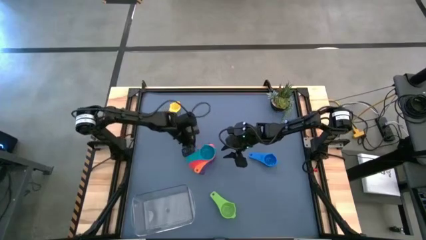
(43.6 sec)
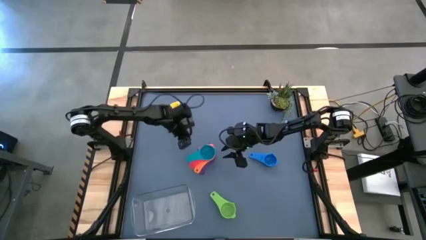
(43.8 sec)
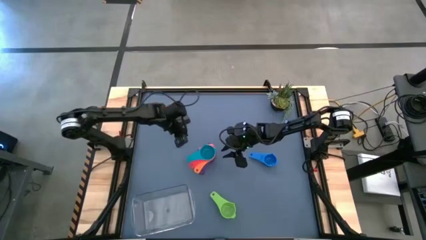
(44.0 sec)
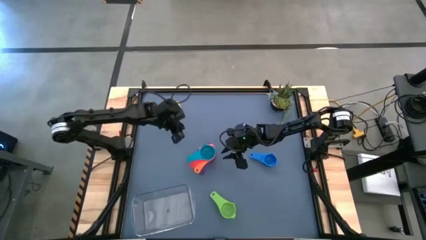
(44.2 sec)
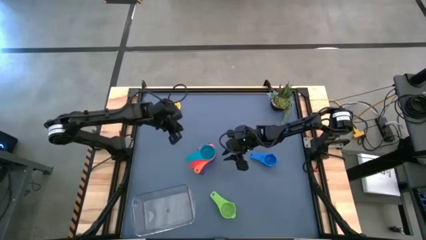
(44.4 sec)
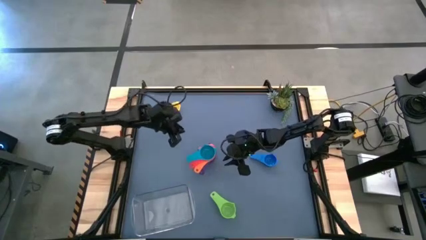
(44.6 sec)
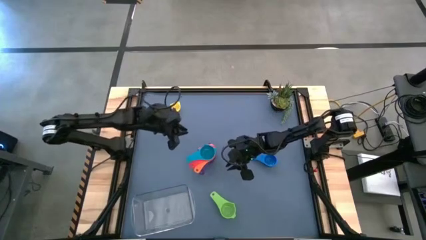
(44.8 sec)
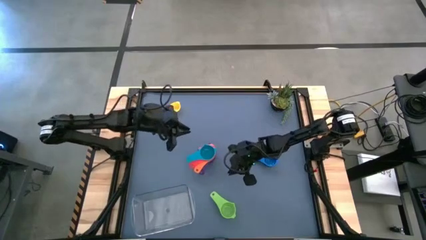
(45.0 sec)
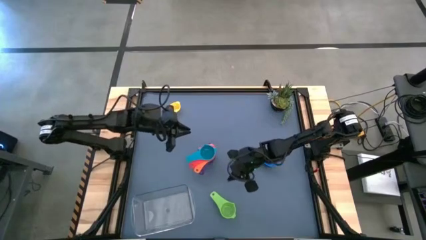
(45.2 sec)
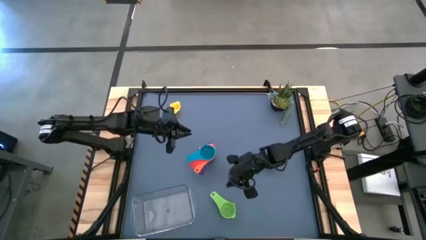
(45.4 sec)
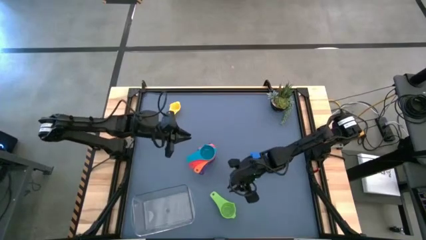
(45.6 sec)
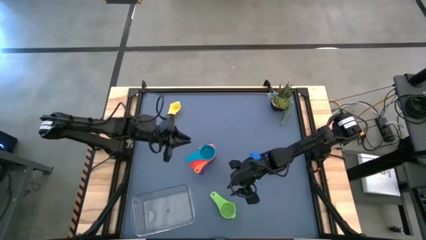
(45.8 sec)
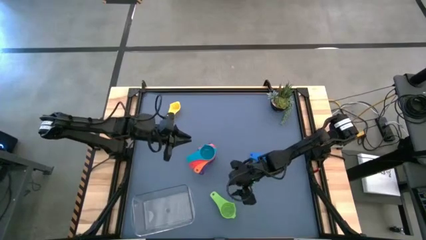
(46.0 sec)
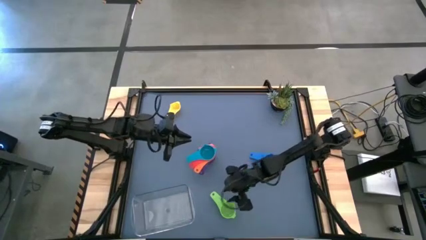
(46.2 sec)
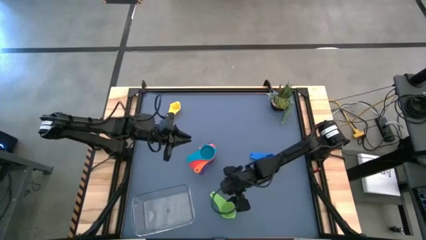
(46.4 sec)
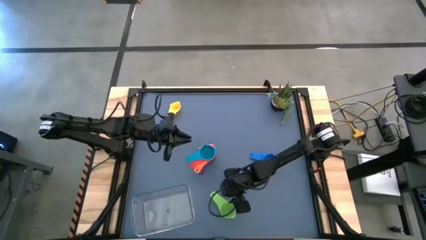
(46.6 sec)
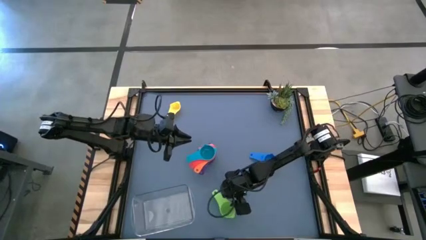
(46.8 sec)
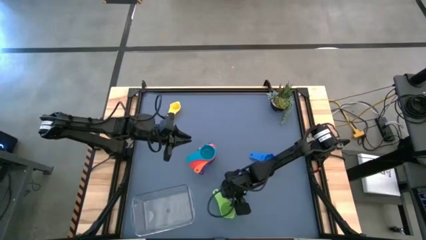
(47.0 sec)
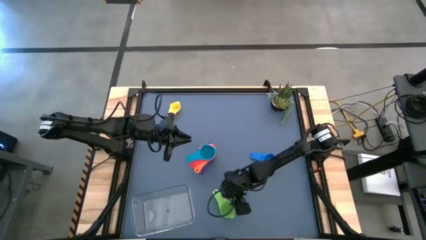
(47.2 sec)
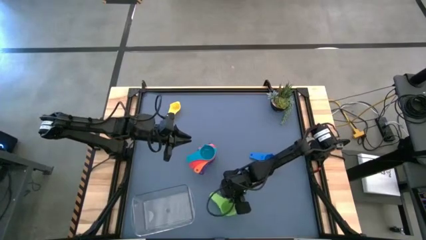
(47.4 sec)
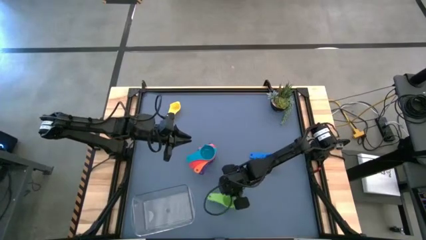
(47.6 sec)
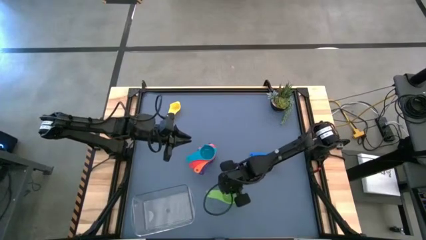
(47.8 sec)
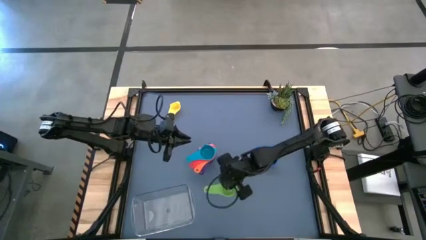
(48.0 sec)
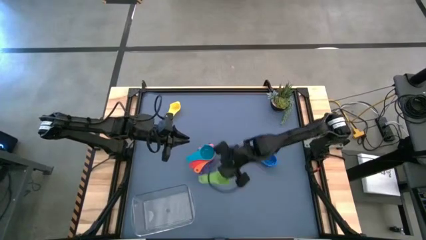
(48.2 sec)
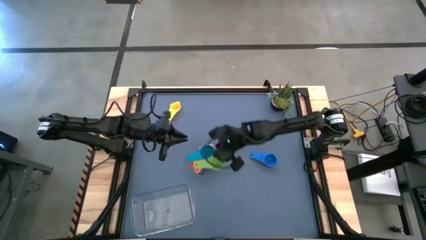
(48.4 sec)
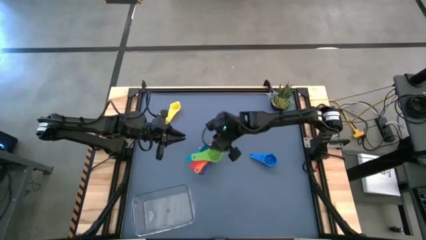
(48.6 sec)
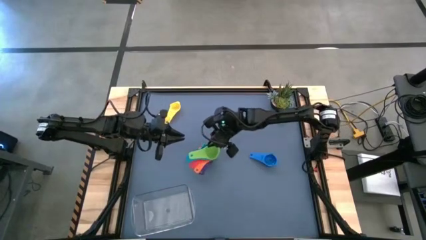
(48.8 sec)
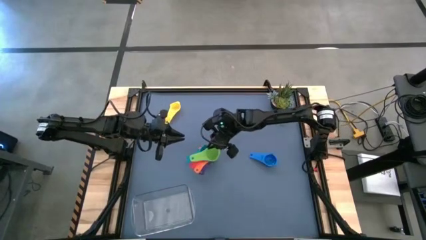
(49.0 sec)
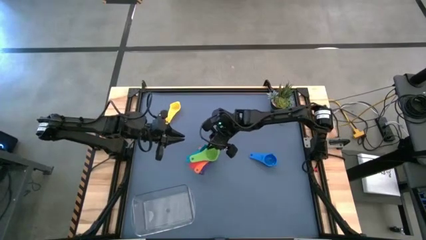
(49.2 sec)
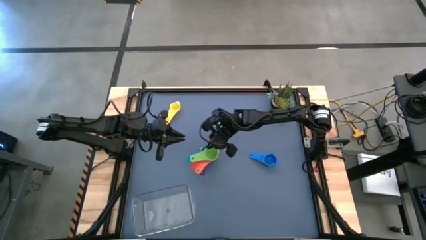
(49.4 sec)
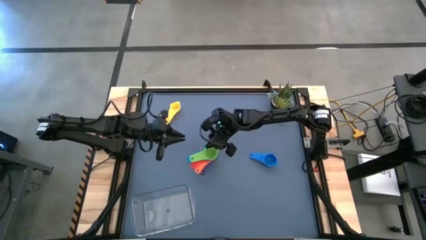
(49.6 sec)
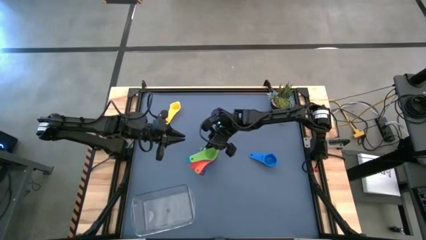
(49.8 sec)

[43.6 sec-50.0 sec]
Task: Nest measuring cups in basket
Stack the light green measuring cup on top of the light blue measuring cup

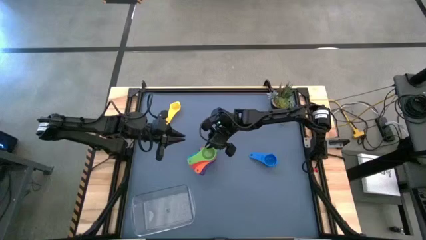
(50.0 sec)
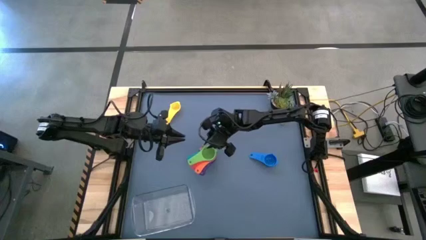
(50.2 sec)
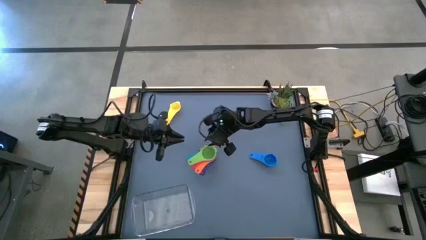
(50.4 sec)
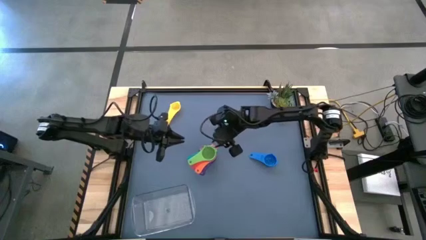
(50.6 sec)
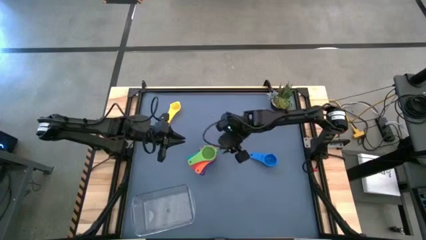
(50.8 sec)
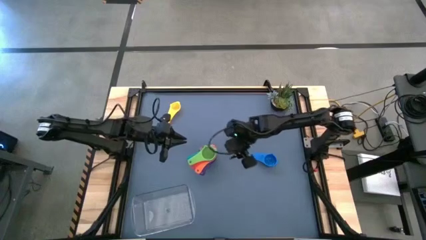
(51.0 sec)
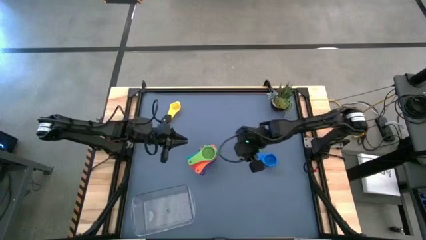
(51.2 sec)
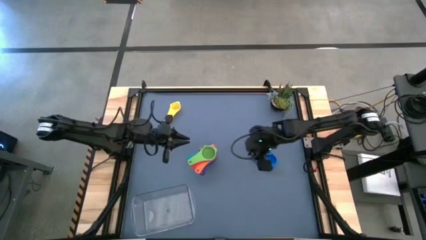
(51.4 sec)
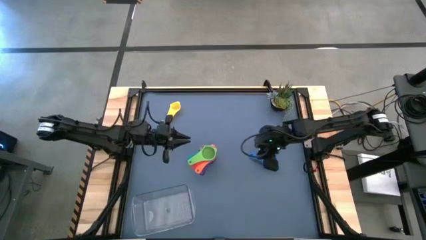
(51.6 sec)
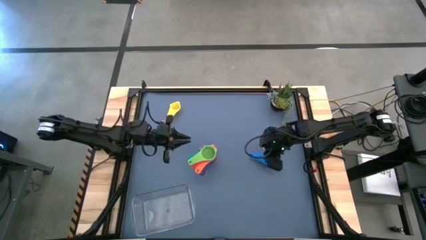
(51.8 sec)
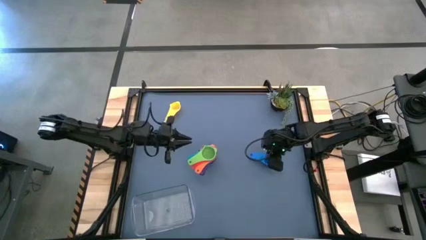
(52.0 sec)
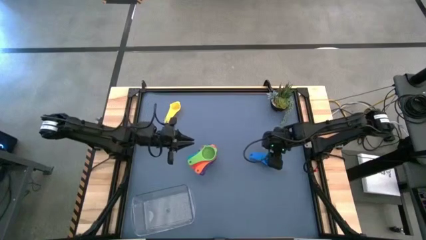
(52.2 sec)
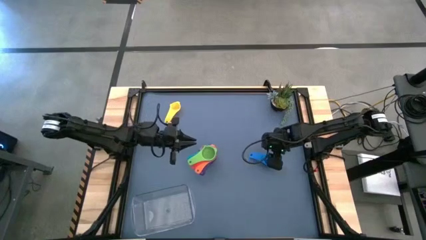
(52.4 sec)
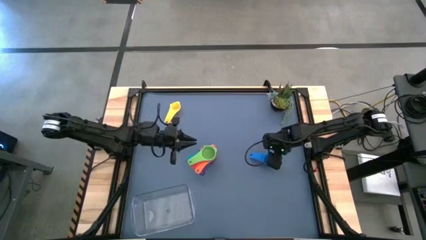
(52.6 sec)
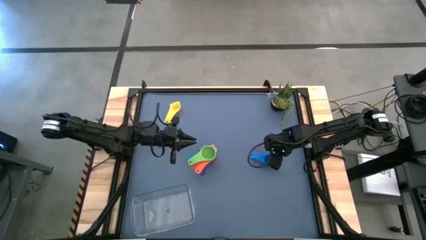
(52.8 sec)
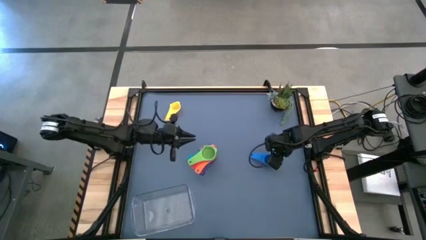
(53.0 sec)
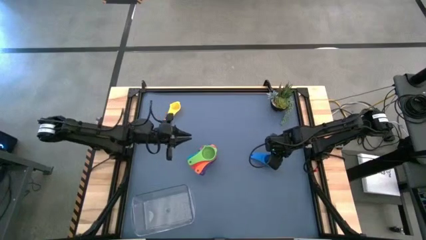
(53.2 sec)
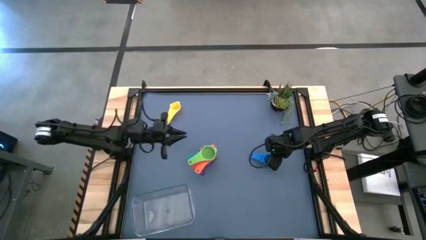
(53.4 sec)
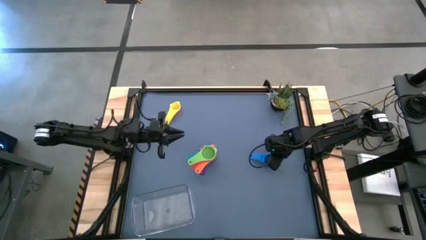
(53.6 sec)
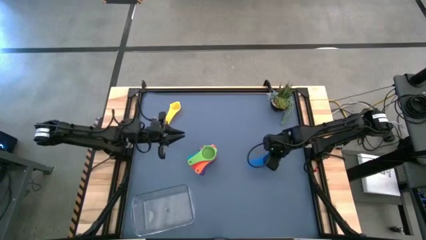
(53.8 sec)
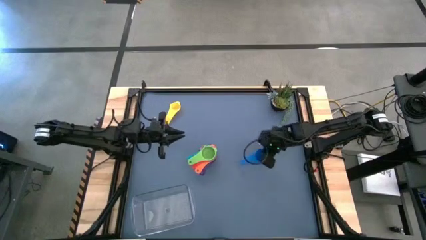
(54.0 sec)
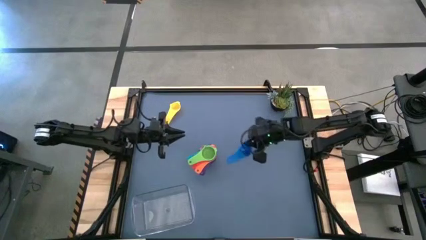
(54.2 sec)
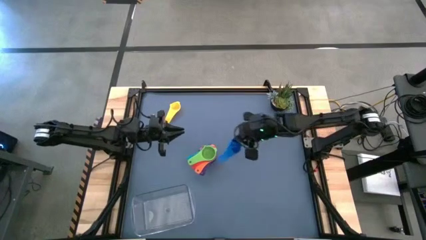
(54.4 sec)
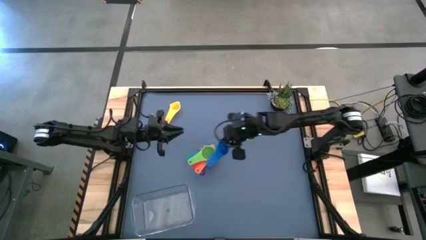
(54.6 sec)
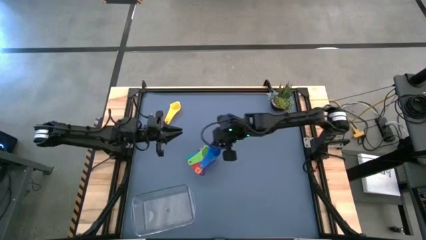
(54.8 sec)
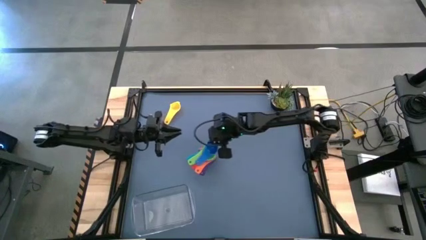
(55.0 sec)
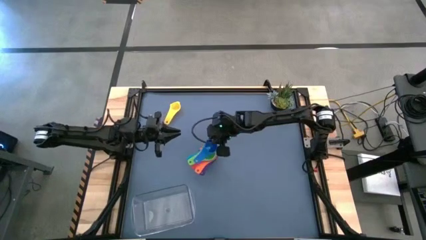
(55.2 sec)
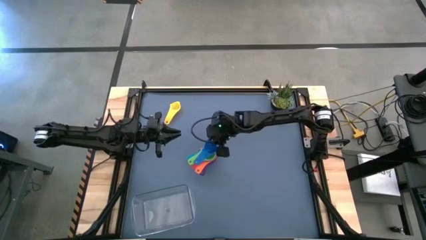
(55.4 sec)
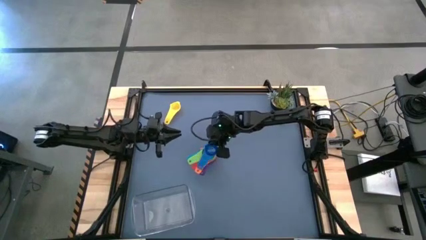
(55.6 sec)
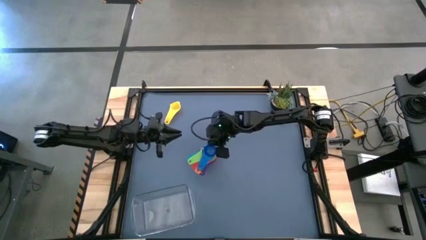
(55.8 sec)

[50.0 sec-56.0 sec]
Stack the blue measuring cup on top of the light green measuring cup

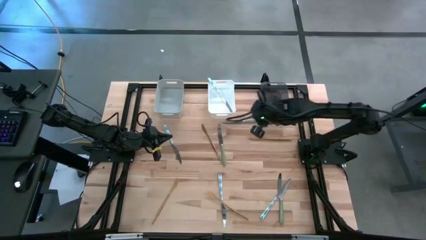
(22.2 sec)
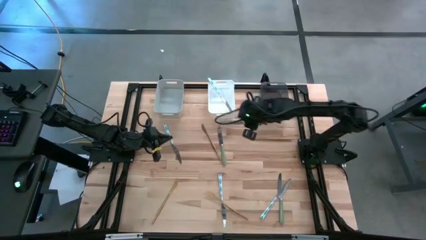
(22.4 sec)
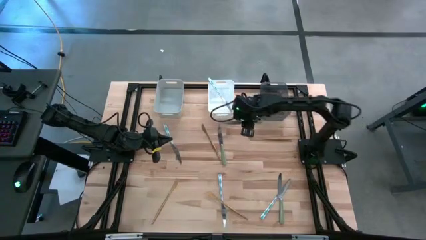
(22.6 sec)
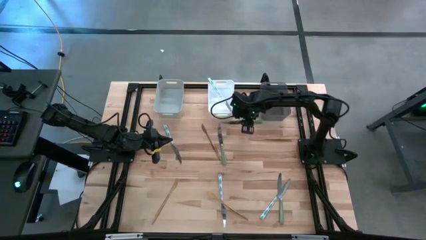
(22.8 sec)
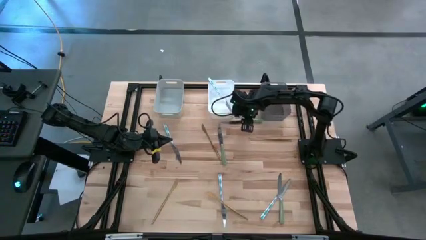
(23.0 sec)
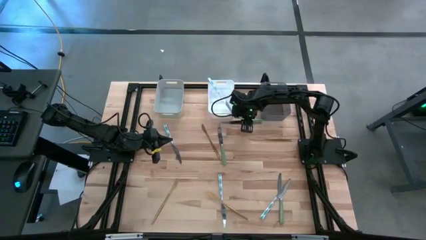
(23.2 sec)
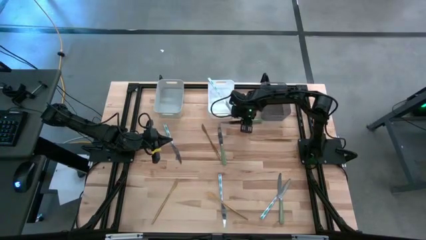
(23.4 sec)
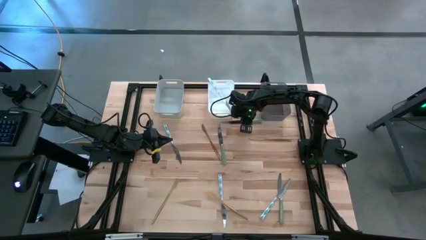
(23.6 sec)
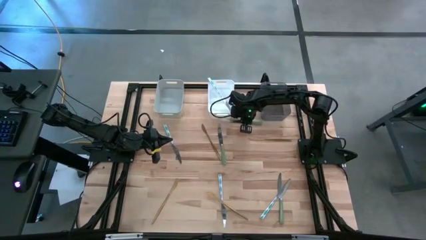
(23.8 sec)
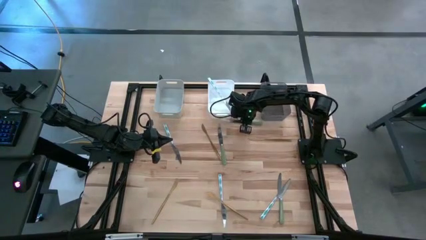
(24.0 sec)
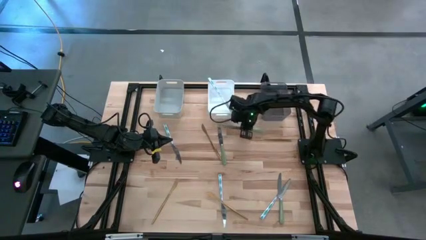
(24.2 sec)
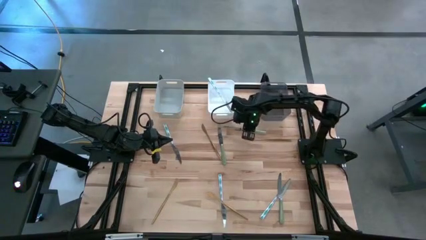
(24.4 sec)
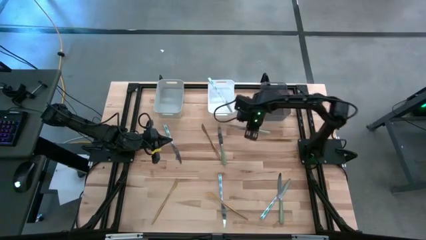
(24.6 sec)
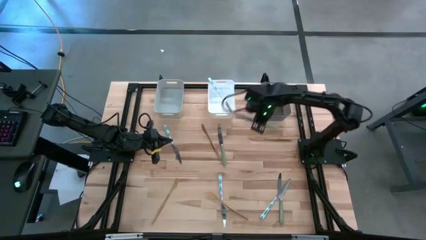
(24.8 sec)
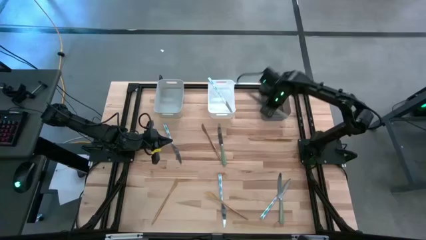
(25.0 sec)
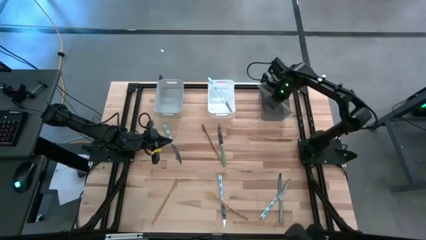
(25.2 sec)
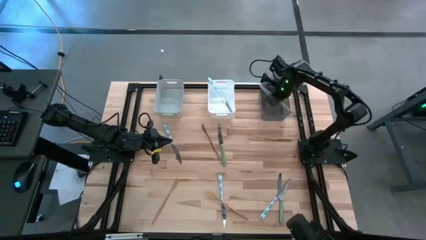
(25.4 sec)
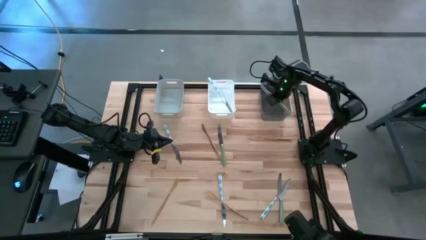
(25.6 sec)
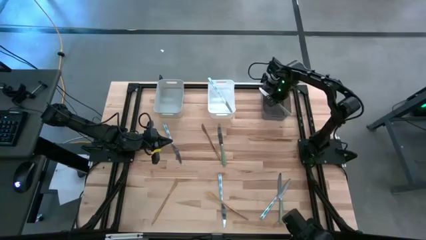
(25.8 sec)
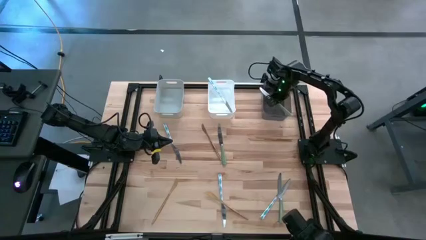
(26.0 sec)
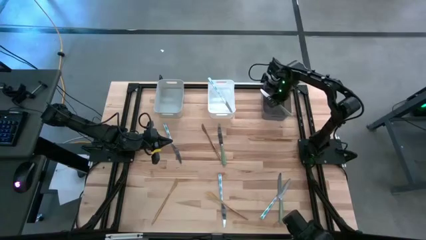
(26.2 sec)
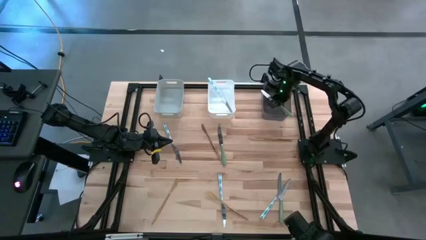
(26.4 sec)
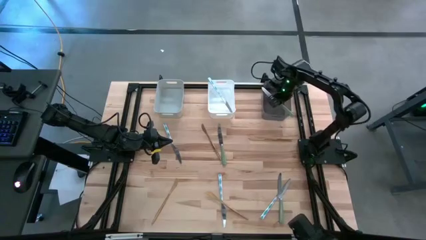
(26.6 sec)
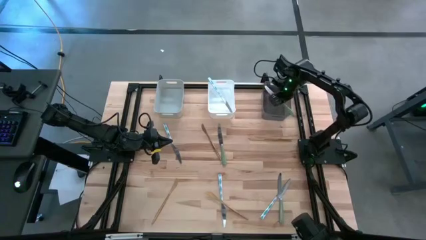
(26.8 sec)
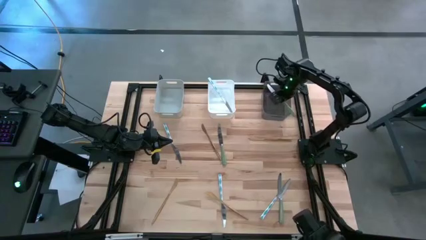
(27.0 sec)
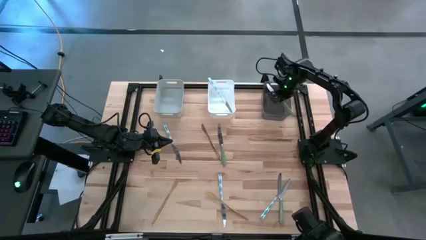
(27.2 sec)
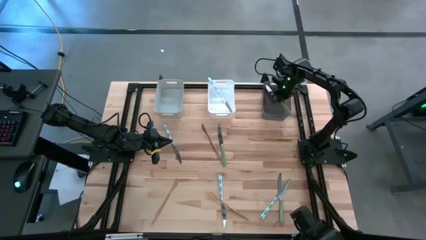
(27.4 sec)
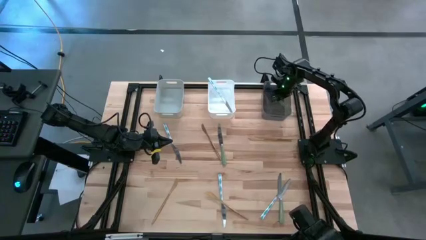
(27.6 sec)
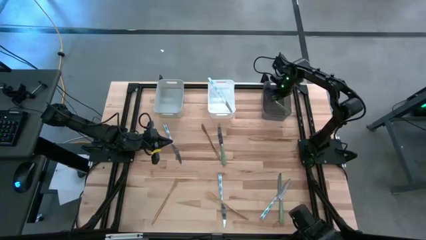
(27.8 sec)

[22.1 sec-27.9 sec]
Task: Sort silverware by color (type)
Put the top right green table knife into the black bin
